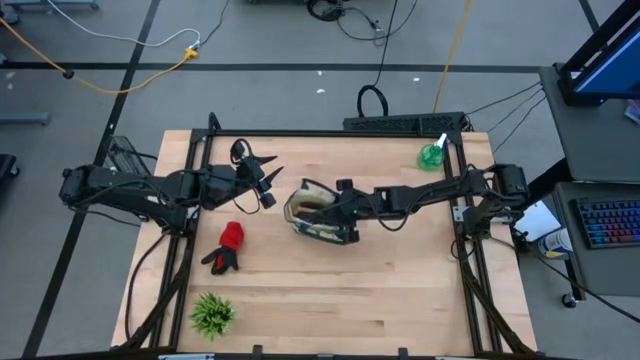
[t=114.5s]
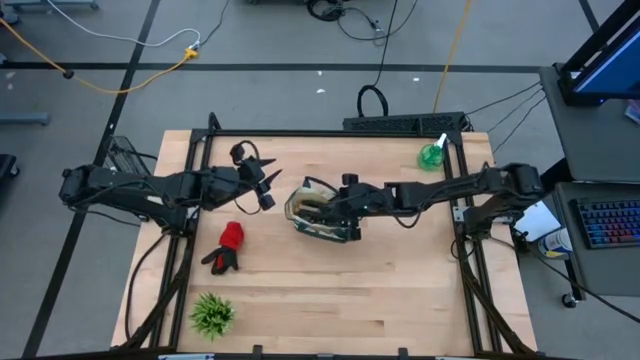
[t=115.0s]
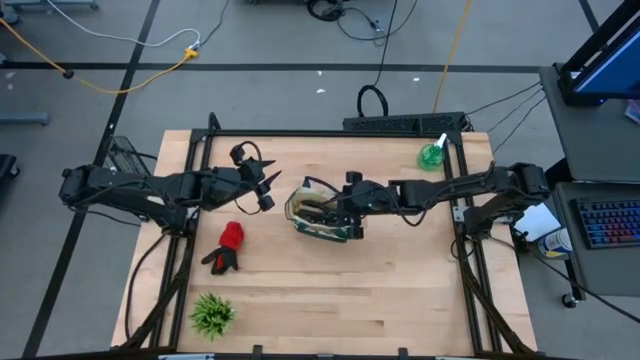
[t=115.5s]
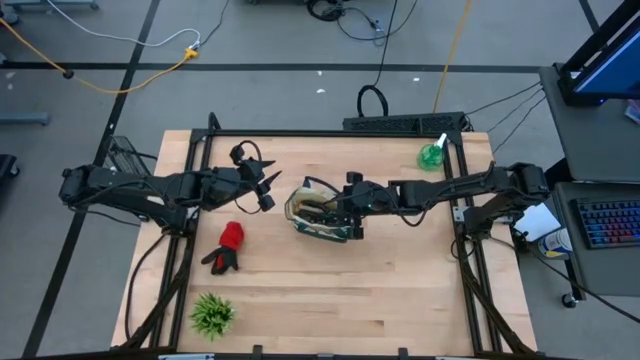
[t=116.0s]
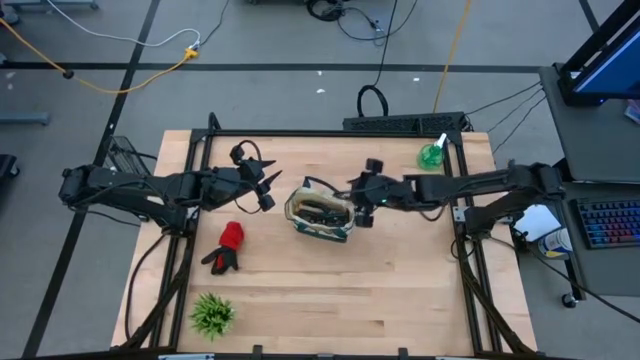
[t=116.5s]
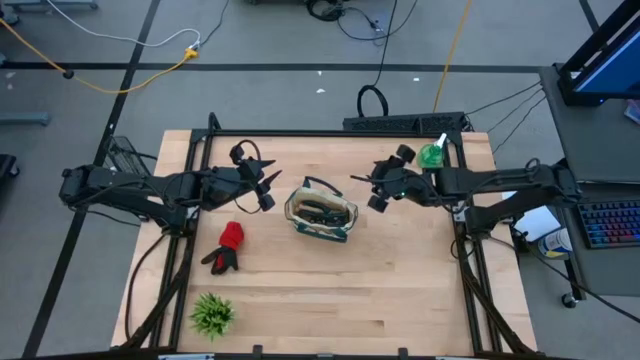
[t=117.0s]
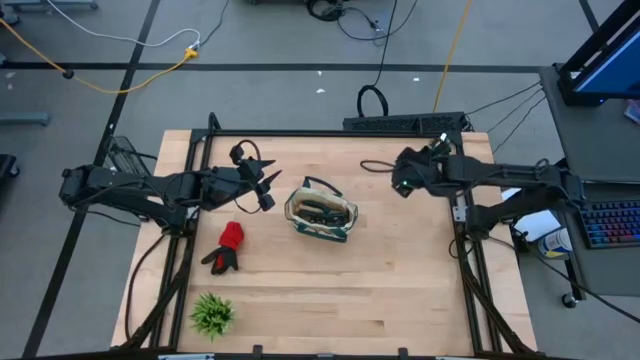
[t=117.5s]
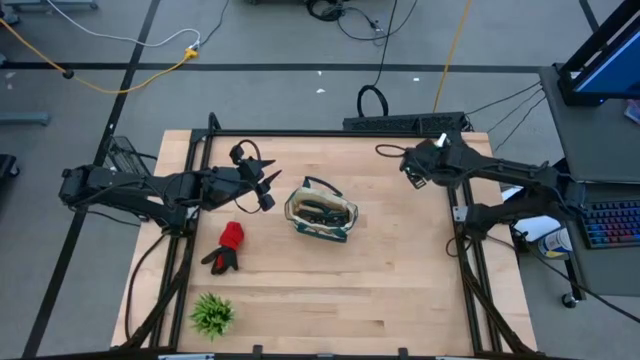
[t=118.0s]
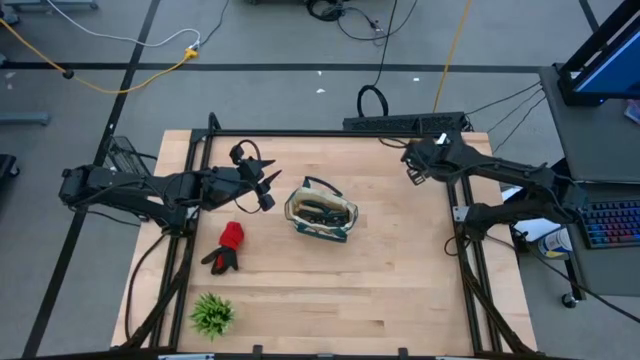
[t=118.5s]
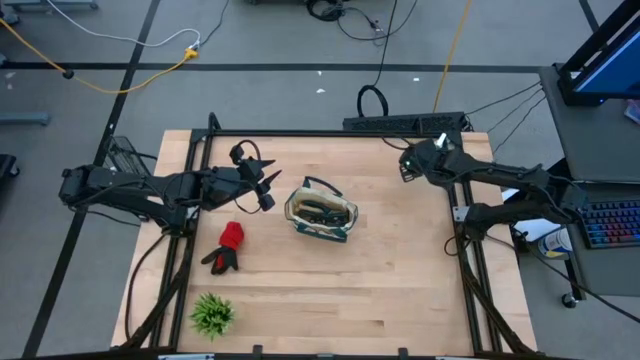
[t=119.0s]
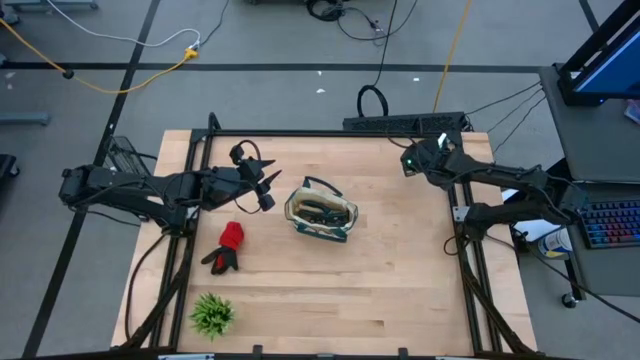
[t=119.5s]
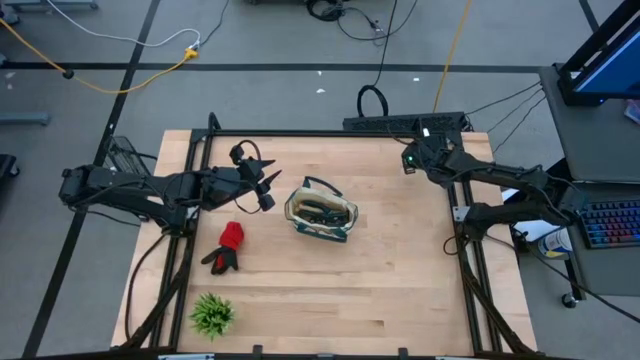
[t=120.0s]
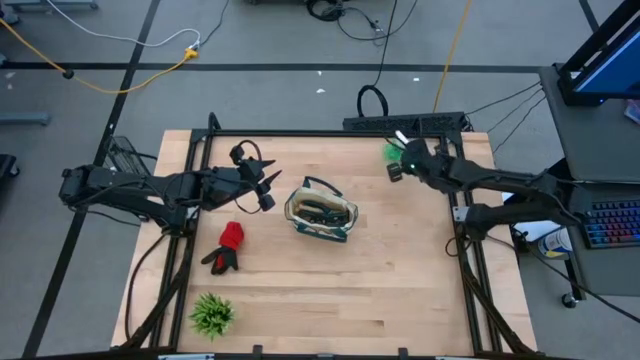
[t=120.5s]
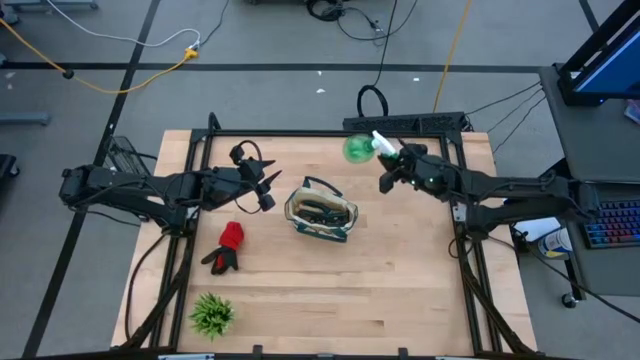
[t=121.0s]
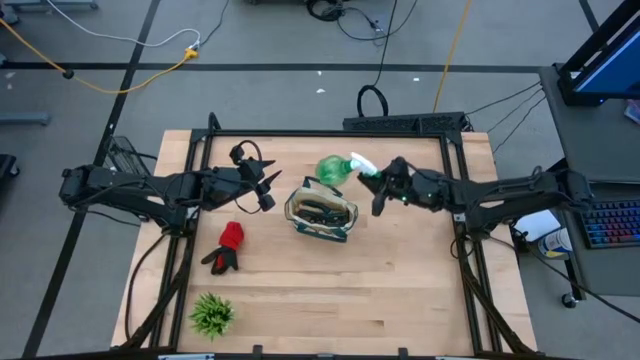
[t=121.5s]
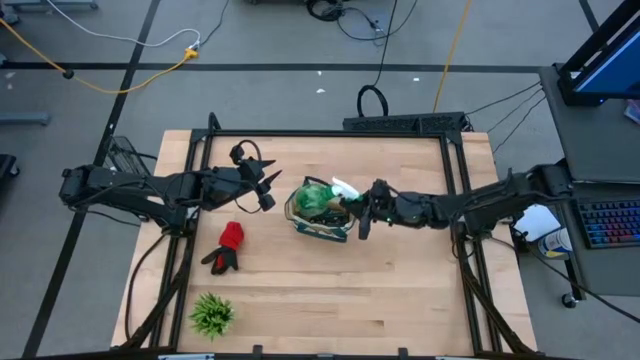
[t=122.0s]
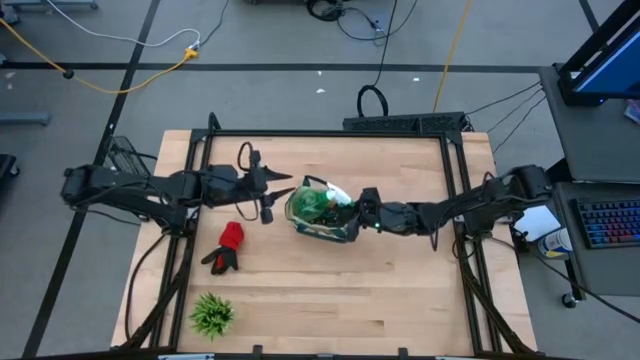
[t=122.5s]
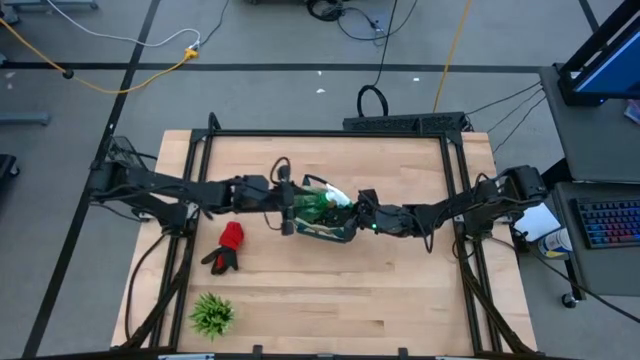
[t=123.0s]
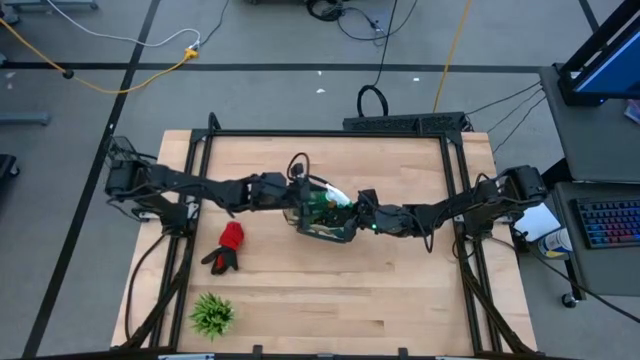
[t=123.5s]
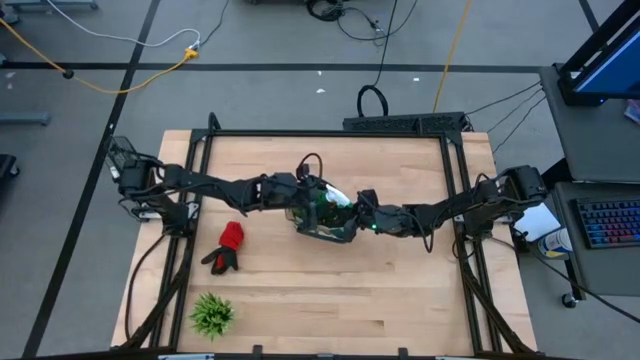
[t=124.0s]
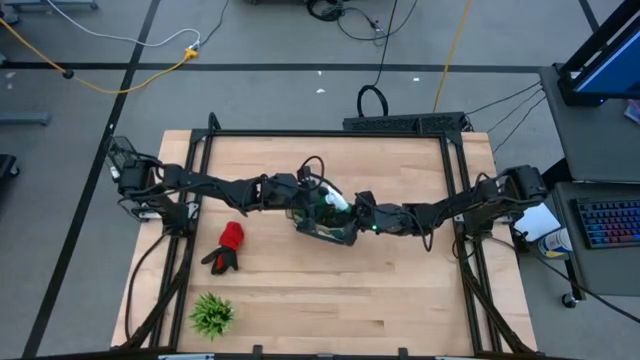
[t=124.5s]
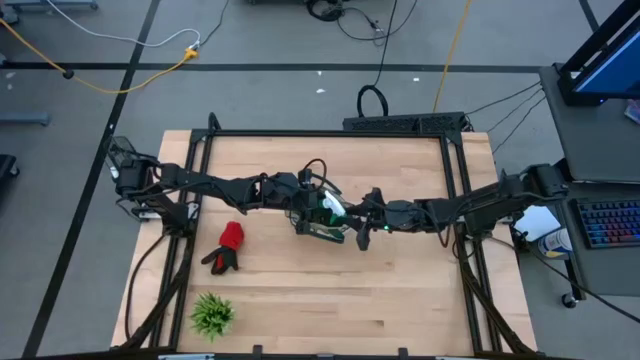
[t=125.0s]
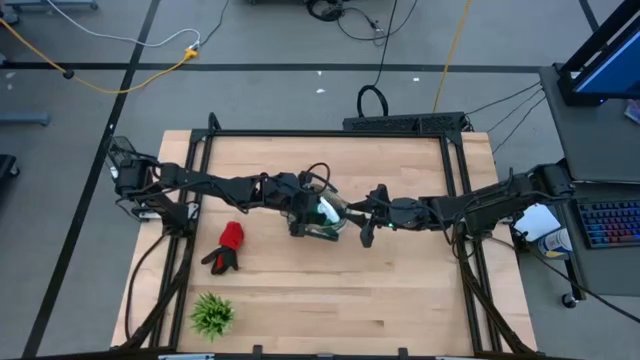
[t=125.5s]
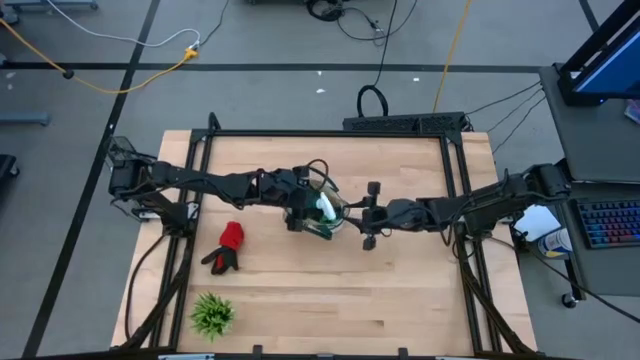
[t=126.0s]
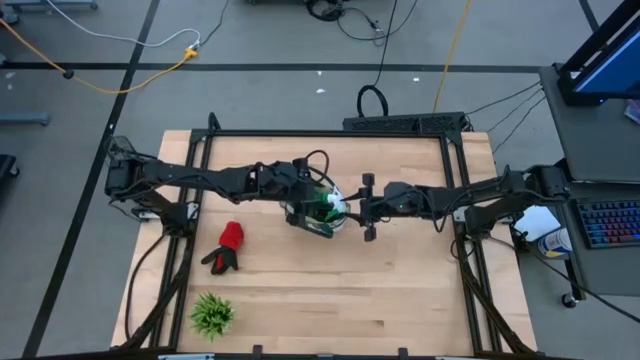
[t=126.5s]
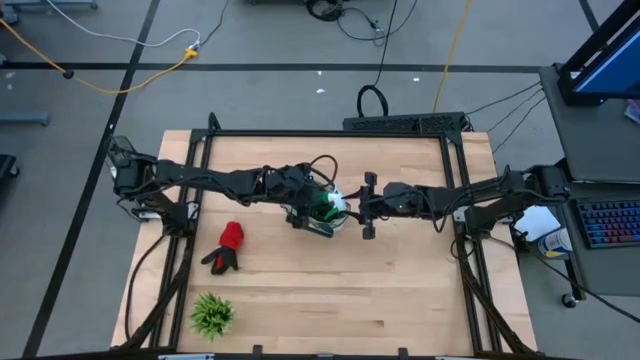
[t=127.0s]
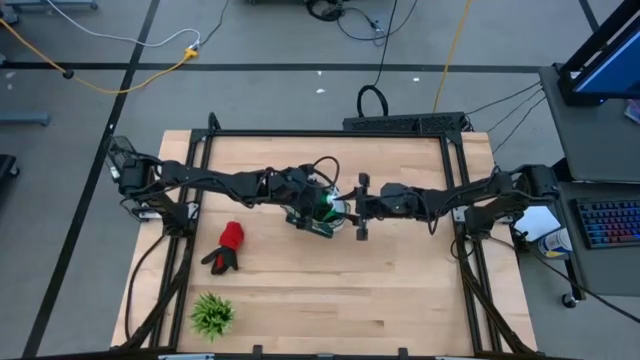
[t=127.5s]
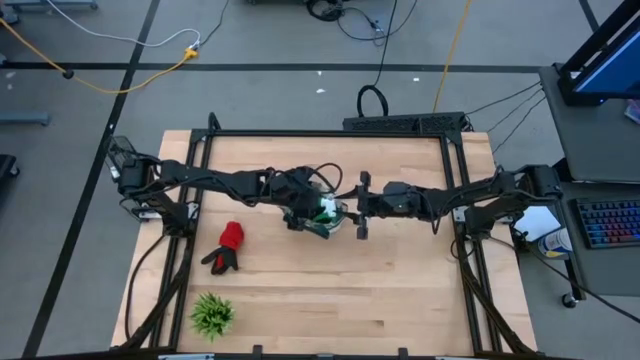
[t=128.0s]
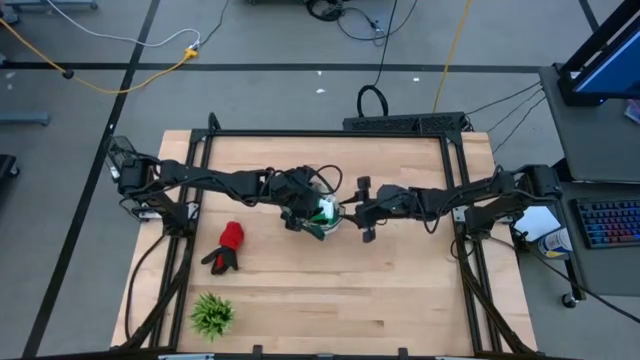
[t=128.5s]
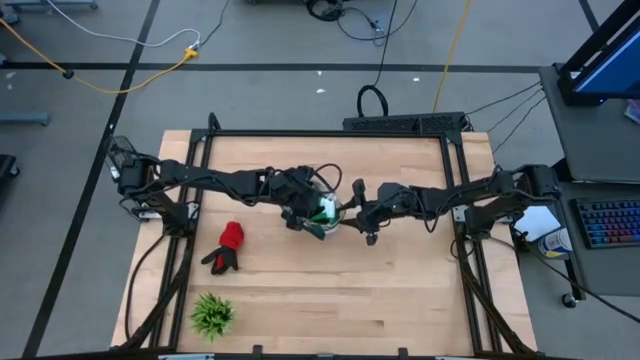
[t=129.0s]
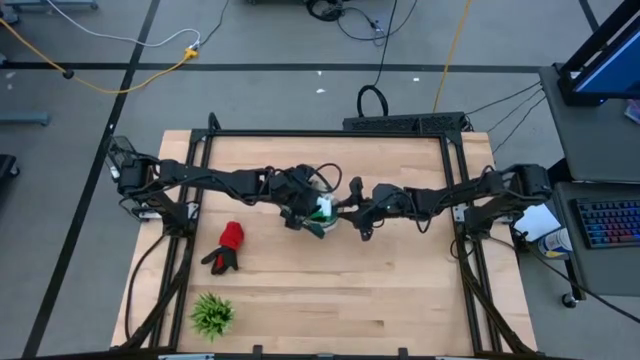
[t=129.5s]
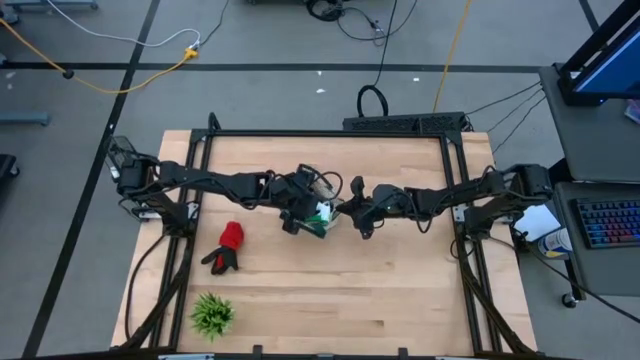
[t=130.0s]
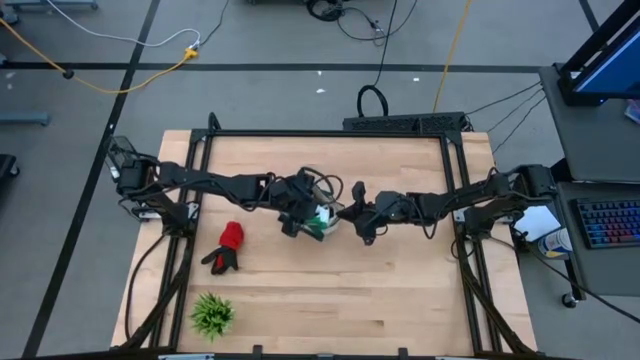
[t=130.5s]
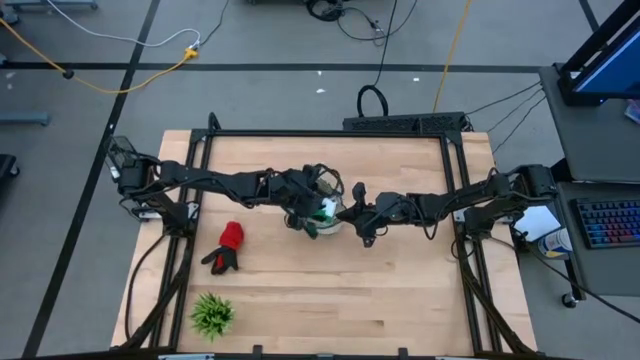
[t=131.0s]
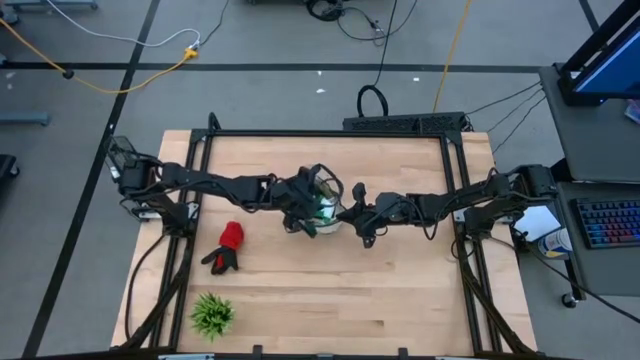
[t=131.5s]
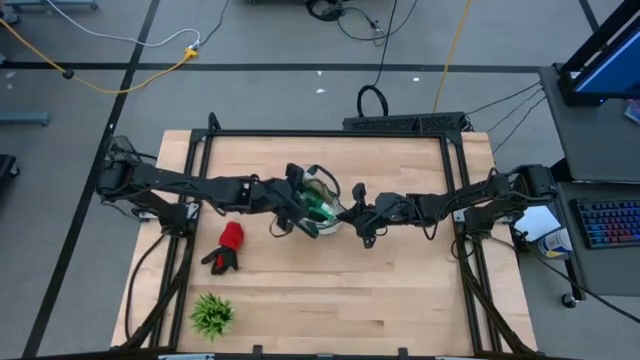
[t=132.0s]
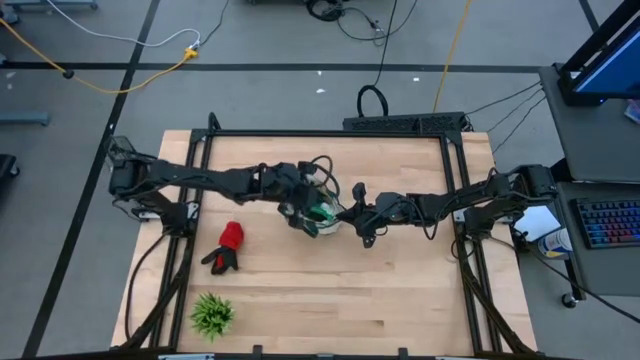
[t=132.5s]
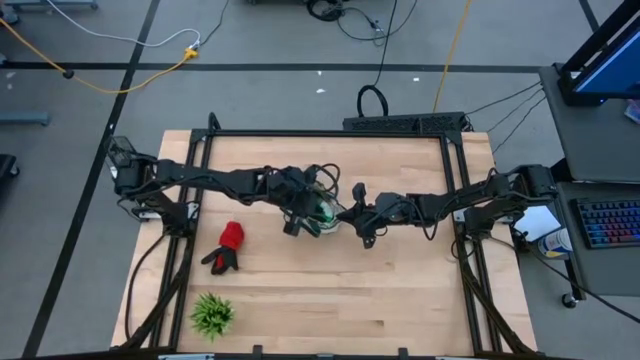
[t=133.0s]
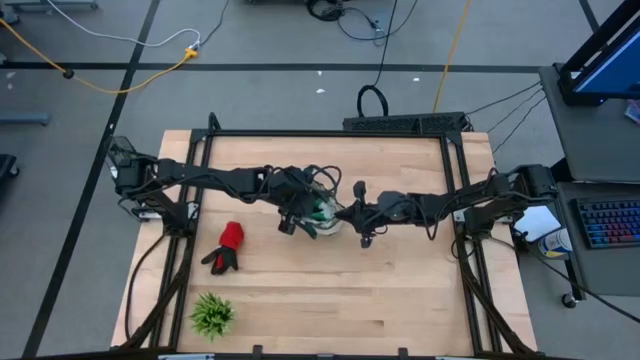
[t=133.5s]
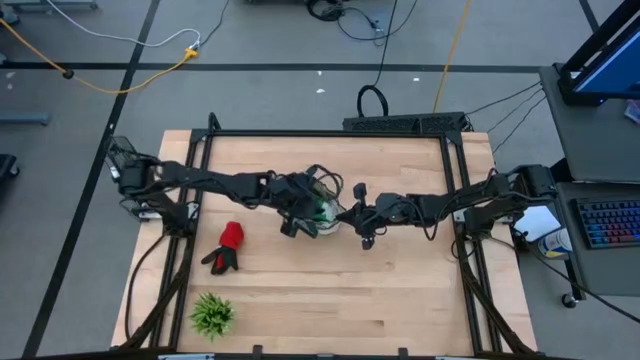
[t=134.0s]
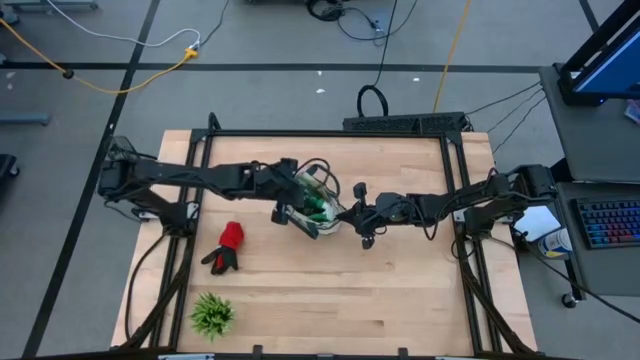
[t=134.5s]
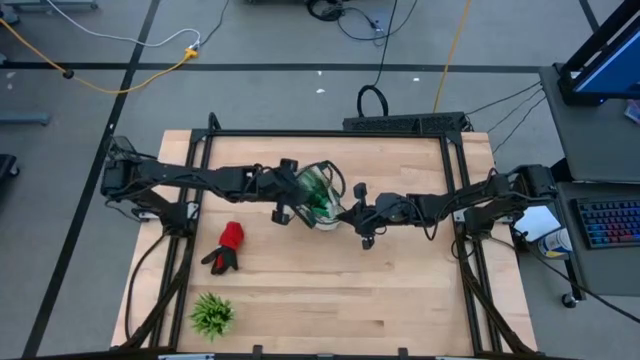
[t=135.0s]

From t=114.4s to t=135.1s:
Task: Pick & Place Garden tools in Gardening bag
Put the green spray bottle into the gardening bag

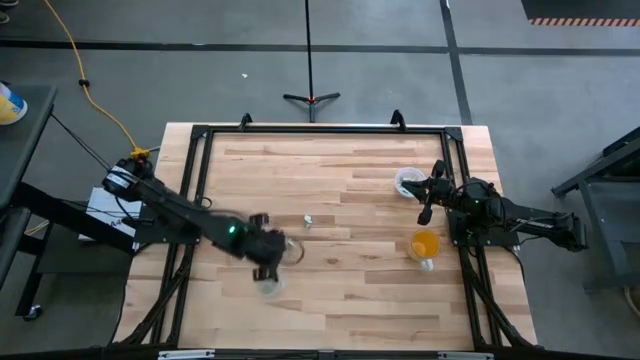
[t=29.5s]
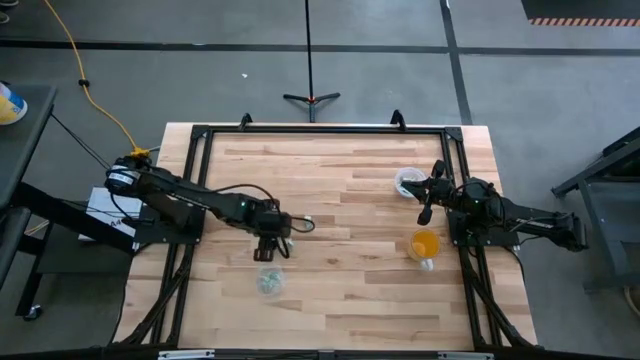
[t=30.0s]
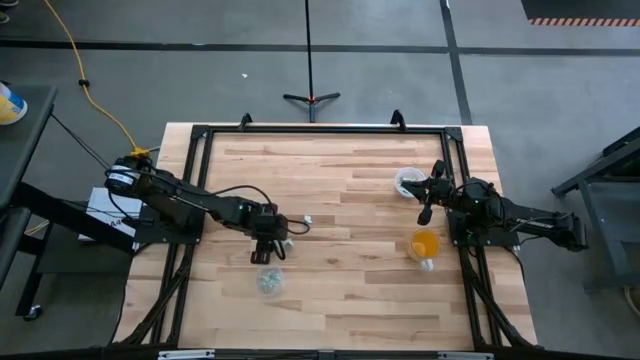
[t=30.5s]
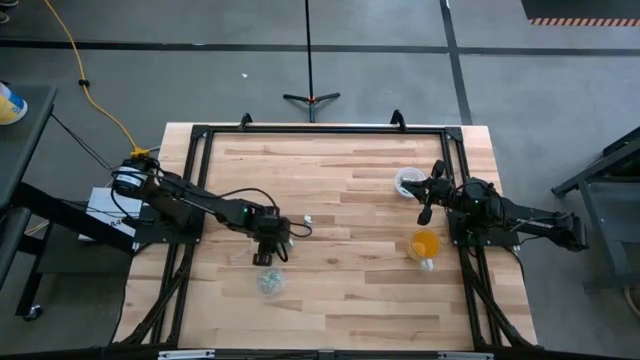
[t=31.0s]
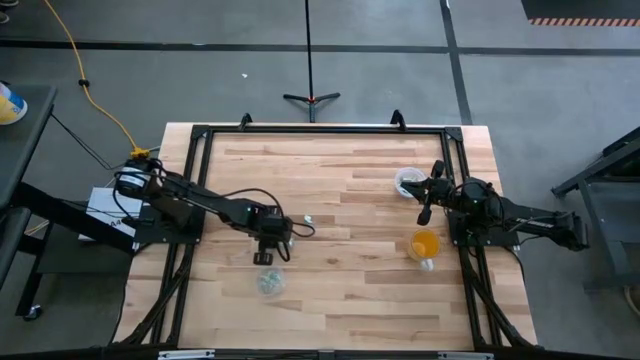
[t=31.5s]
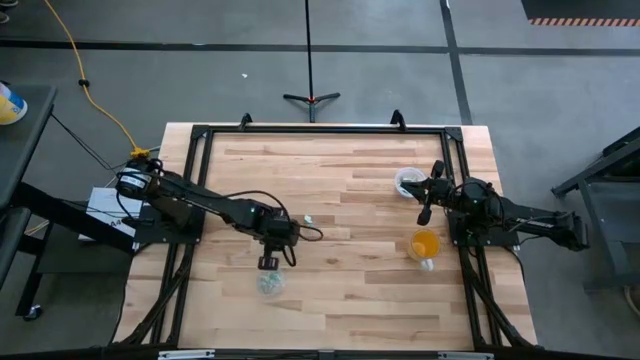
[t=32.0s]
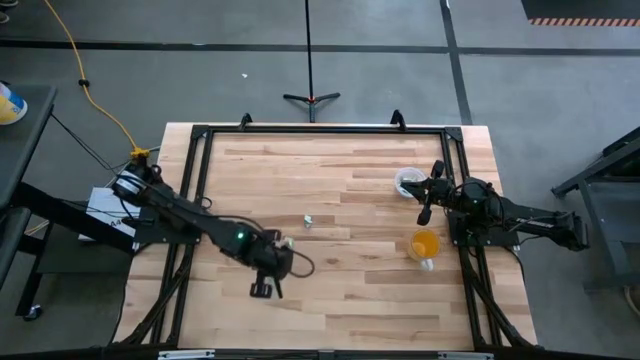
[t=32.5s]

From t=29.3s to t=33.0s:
Task: Pick and place Stevia / Truvia into bins
Put the bottom left stevia packet into the square container
